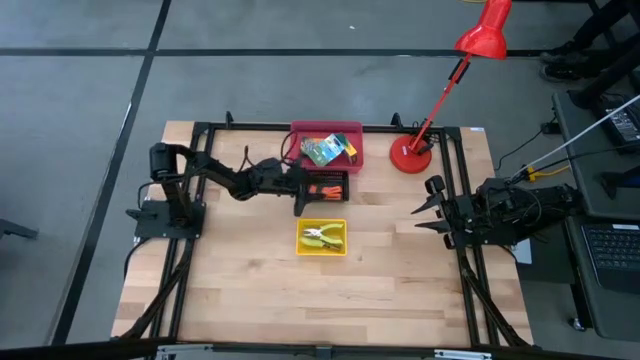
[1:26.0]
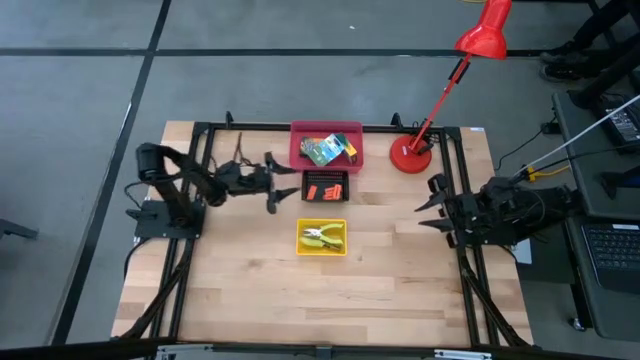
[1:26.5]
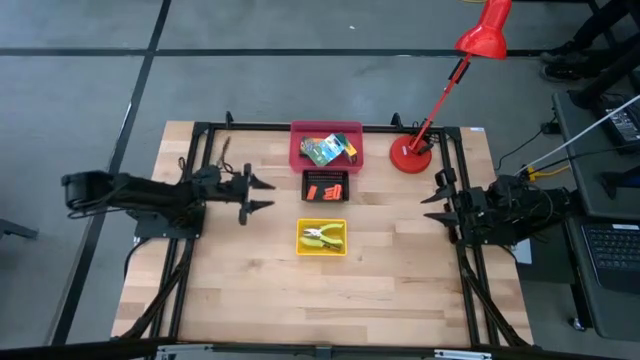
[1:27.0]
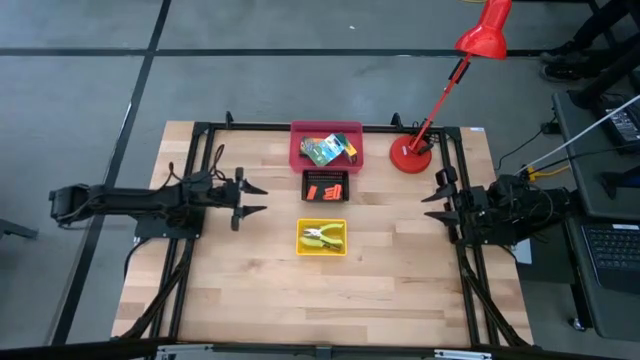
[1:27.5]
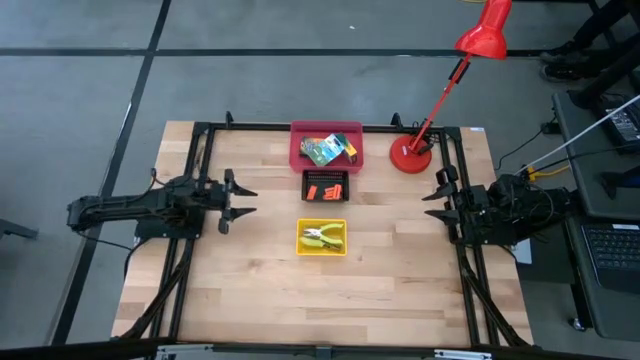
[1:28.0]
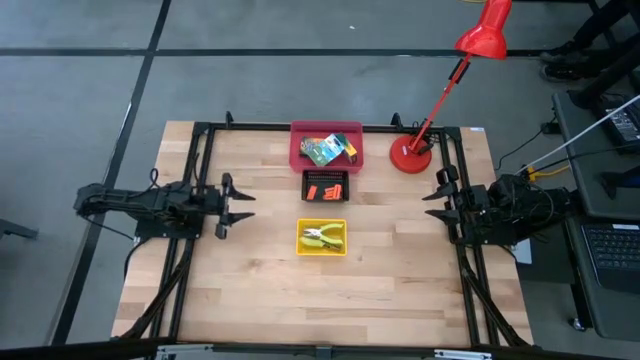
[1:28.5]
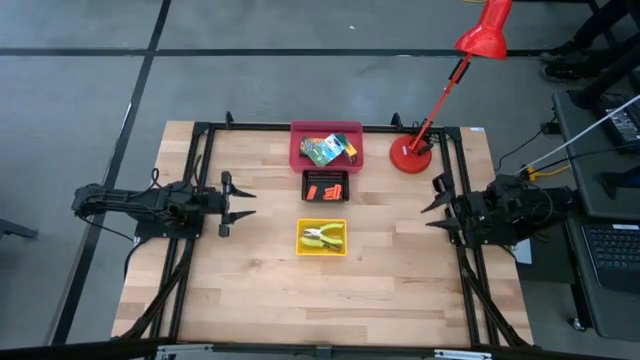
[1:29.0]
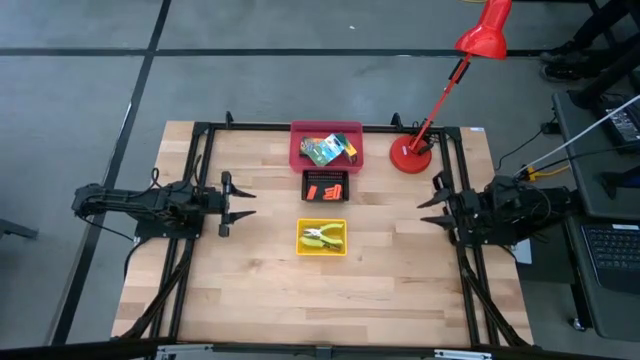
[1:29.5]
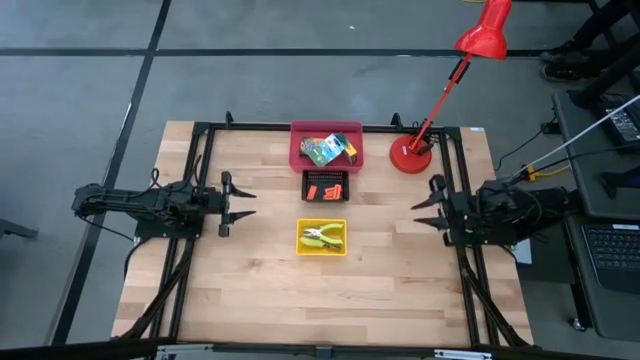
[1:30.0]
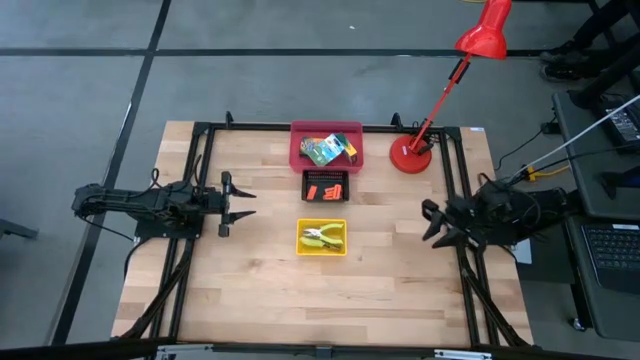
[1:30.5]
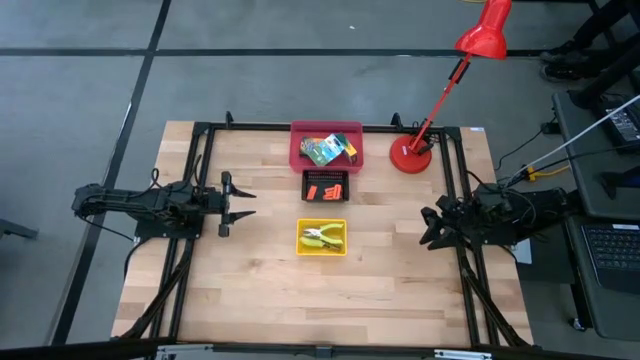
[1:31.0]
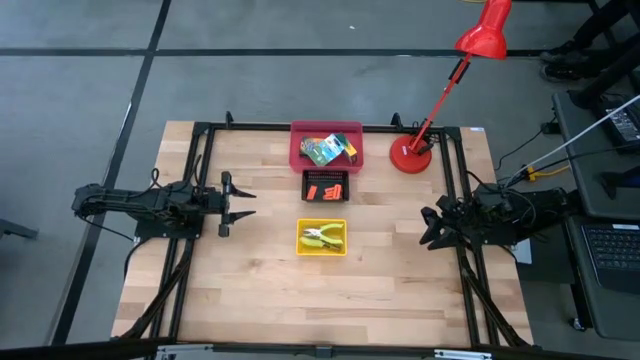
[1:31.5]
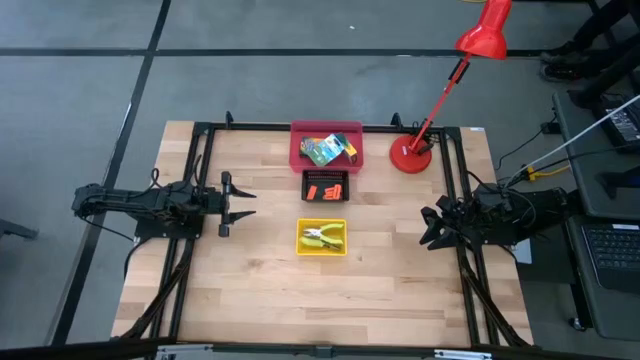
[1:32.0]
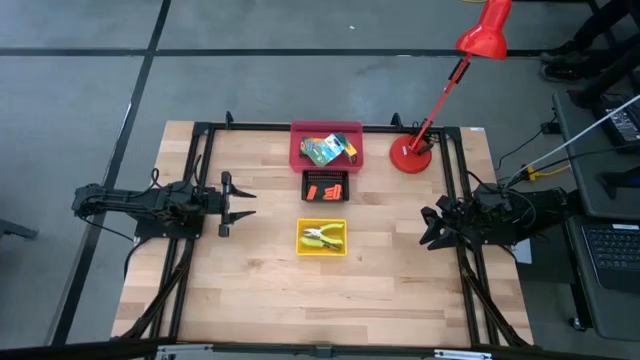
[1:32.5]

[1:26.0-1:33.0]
Task: Pick & Place School Supplies
Return to Home Position

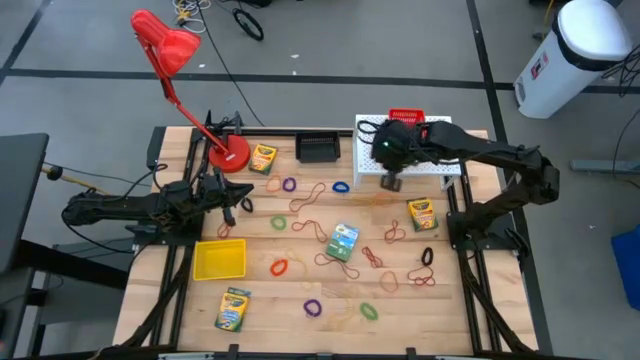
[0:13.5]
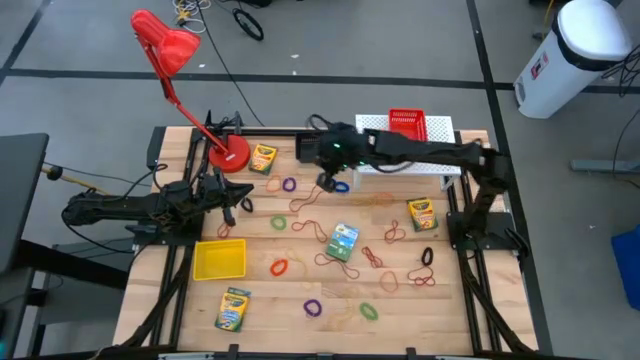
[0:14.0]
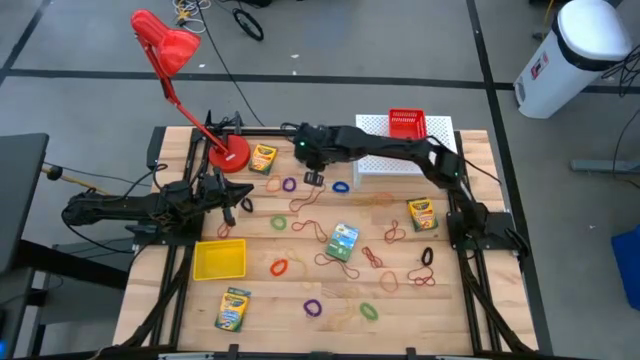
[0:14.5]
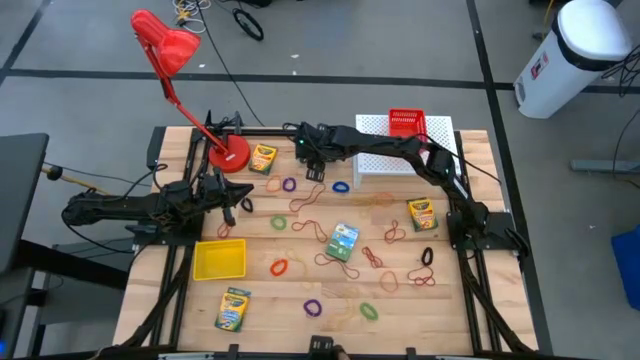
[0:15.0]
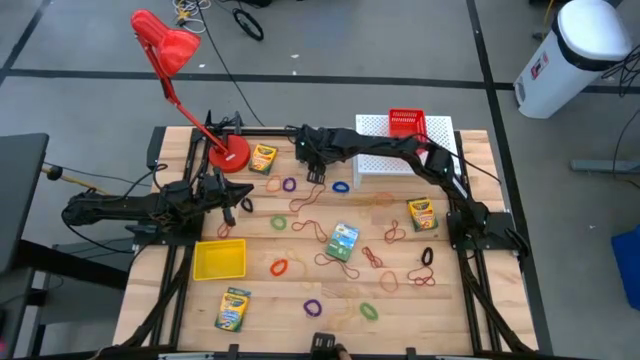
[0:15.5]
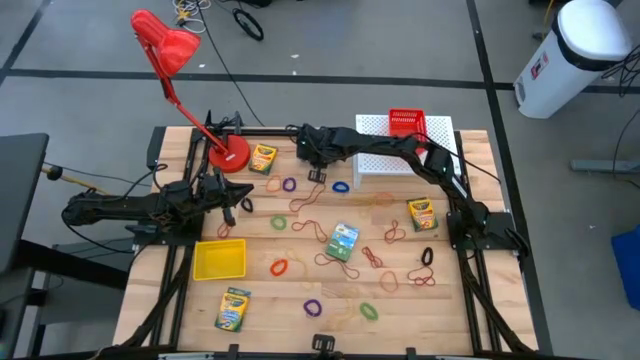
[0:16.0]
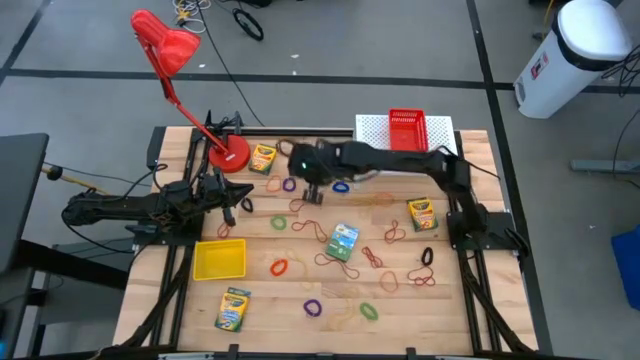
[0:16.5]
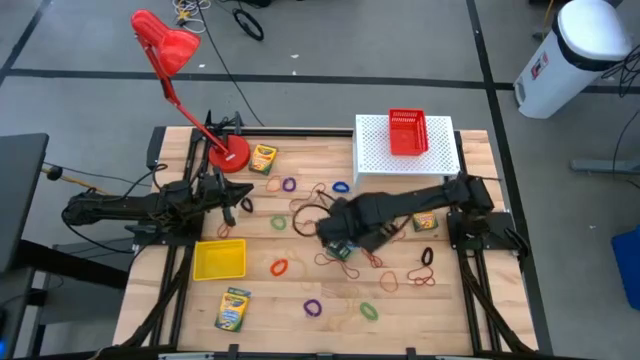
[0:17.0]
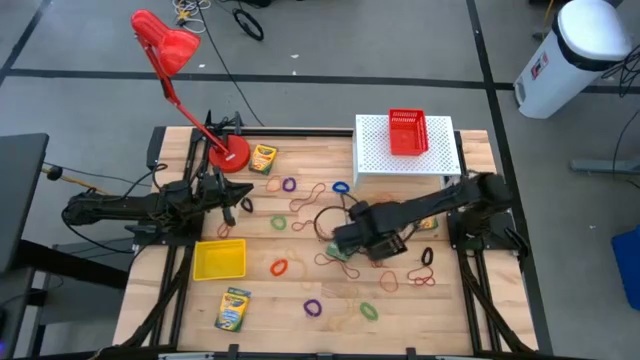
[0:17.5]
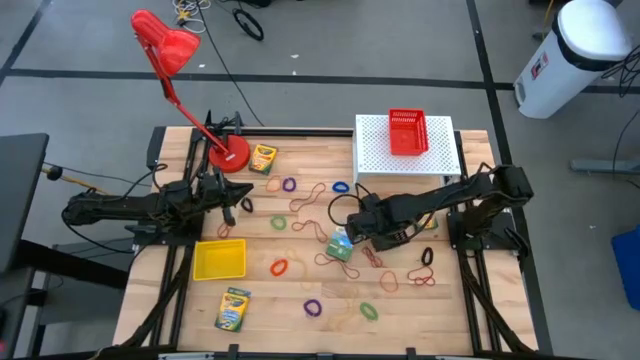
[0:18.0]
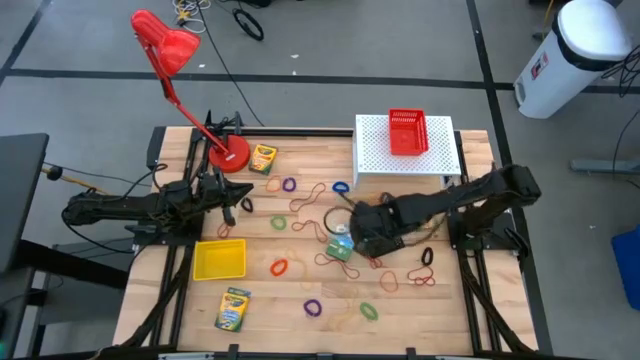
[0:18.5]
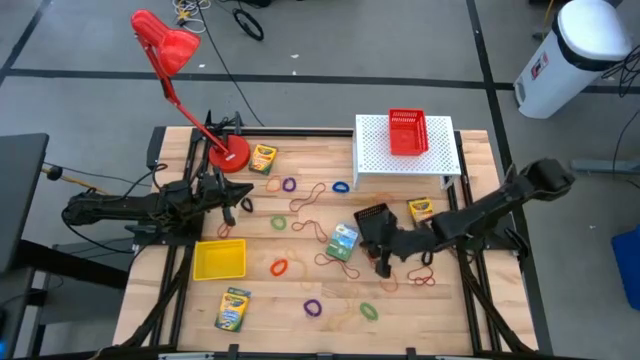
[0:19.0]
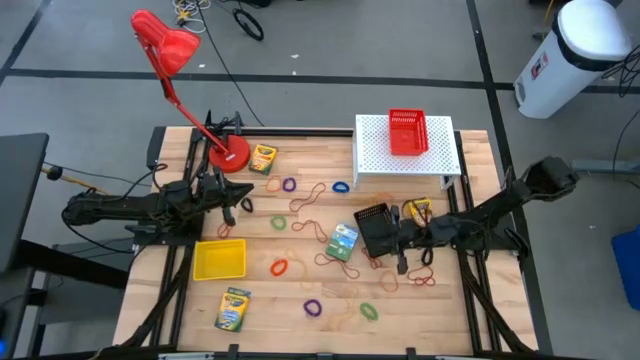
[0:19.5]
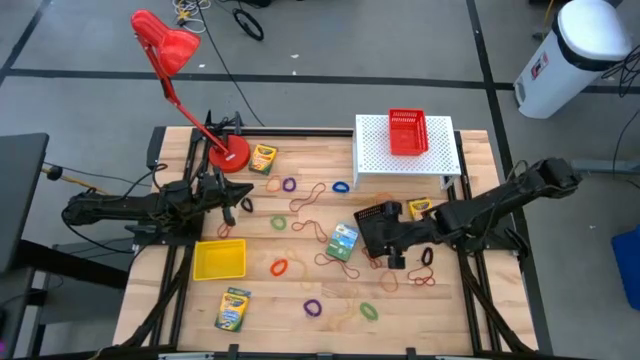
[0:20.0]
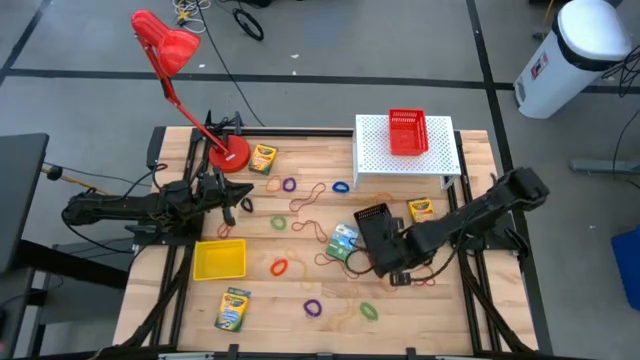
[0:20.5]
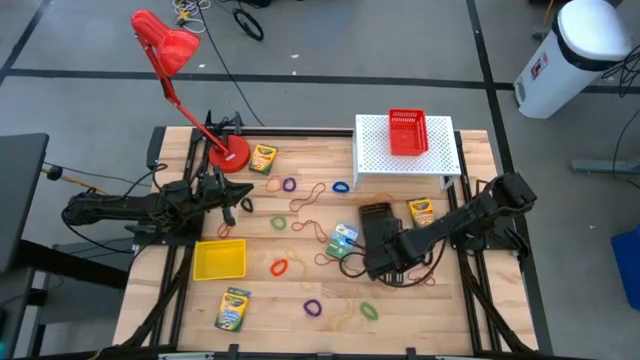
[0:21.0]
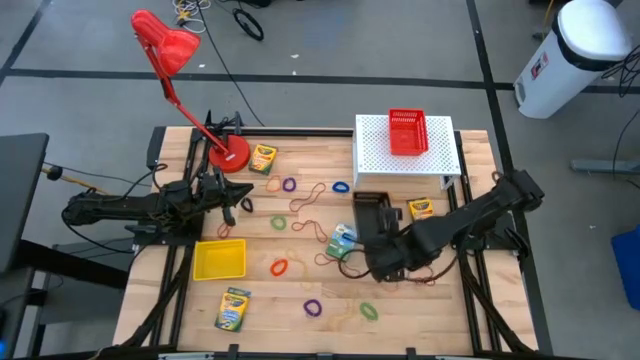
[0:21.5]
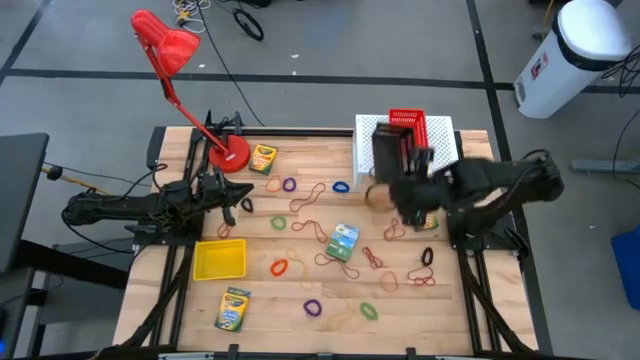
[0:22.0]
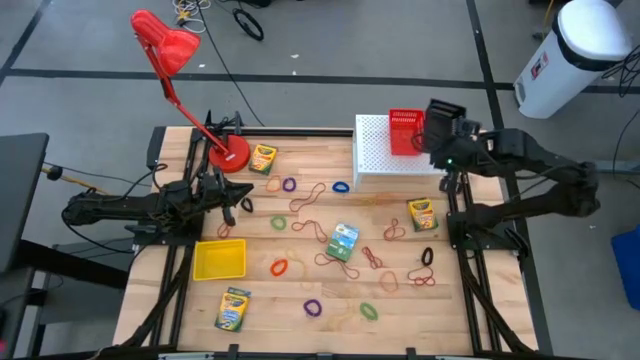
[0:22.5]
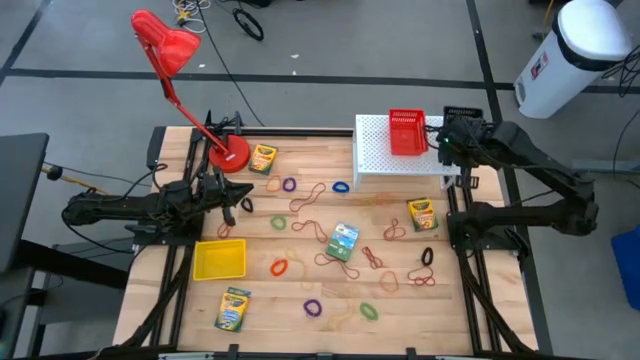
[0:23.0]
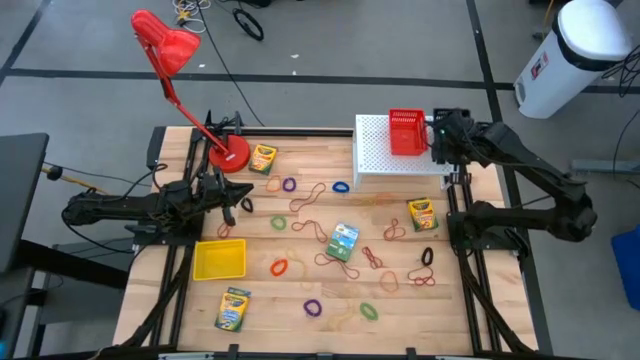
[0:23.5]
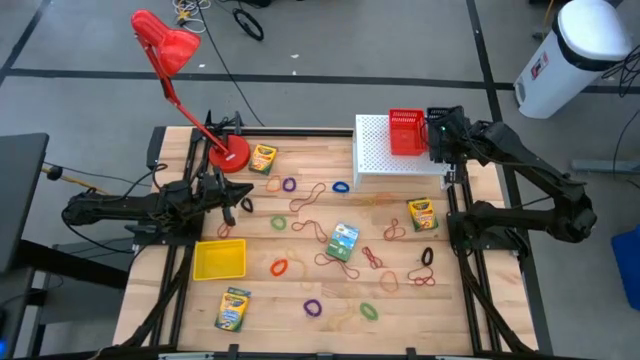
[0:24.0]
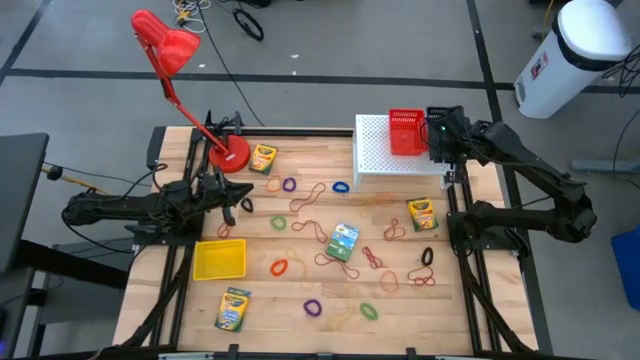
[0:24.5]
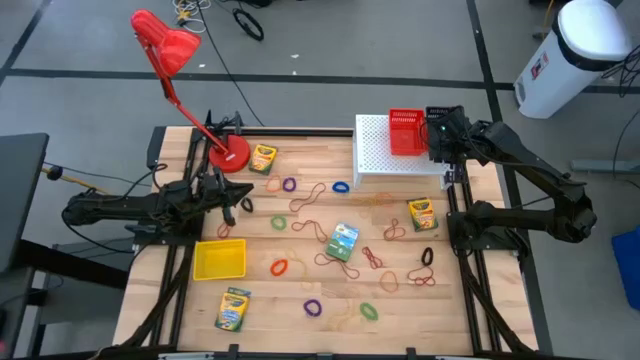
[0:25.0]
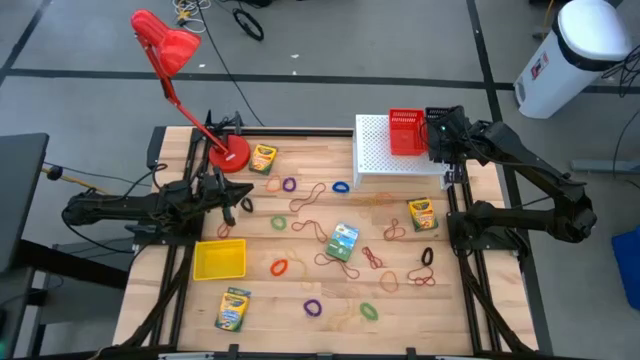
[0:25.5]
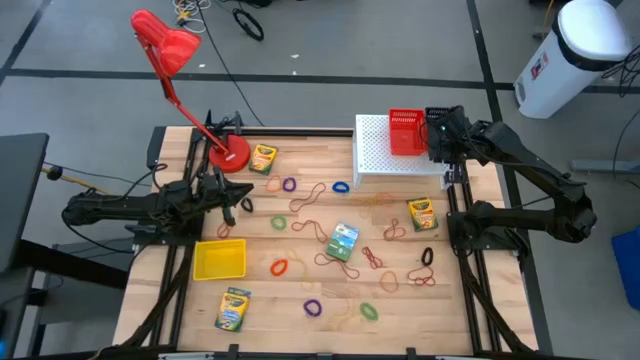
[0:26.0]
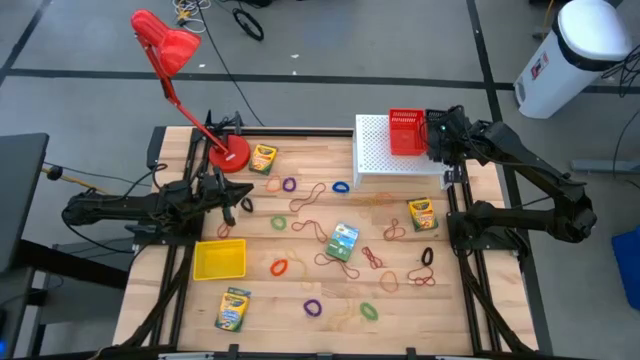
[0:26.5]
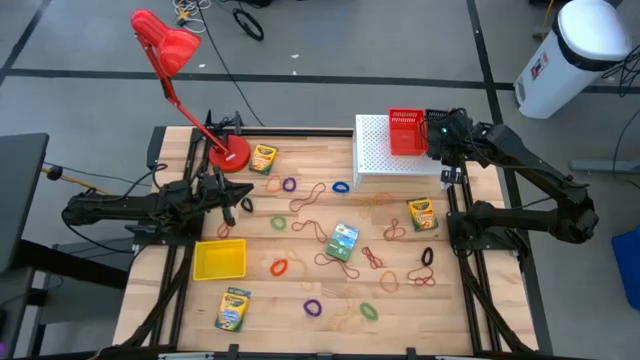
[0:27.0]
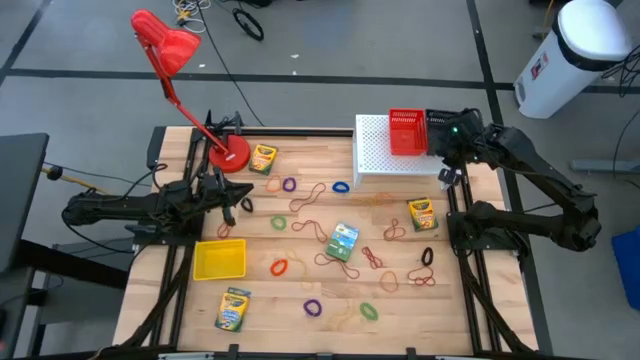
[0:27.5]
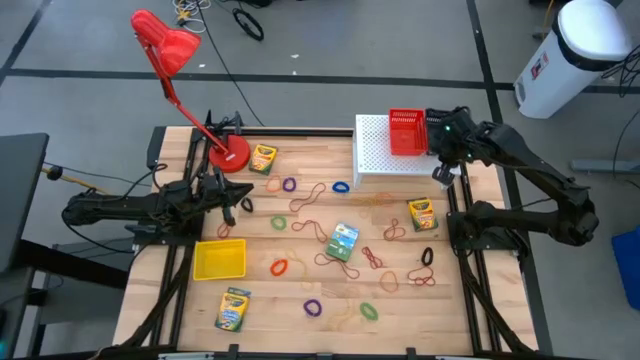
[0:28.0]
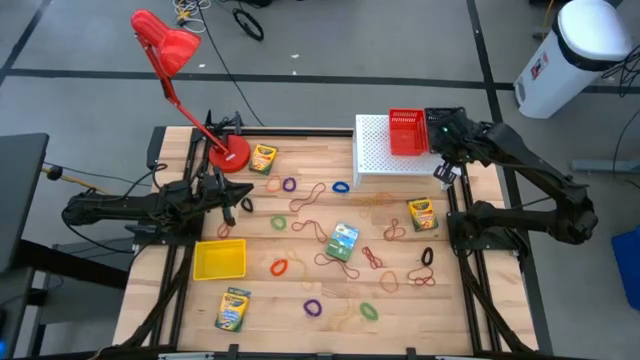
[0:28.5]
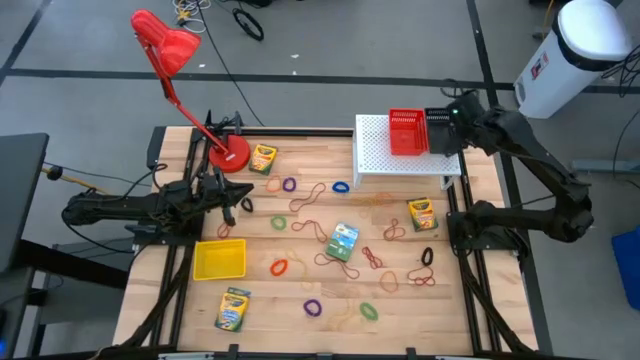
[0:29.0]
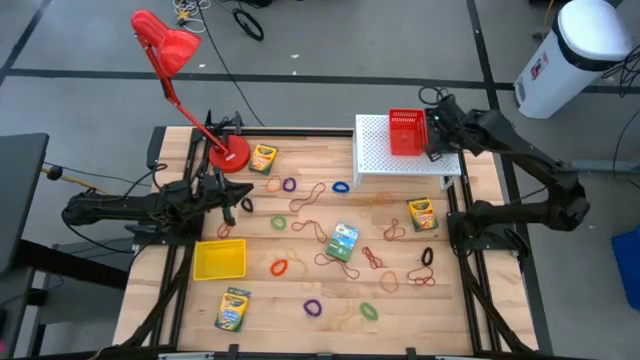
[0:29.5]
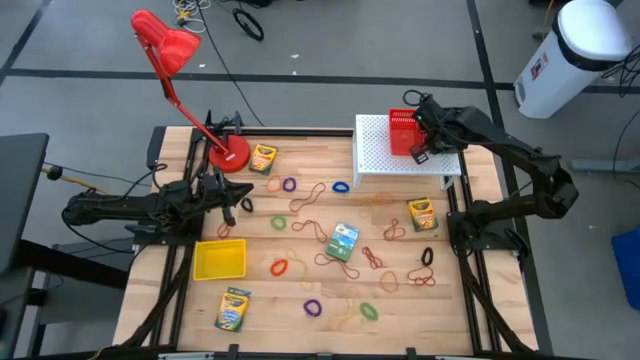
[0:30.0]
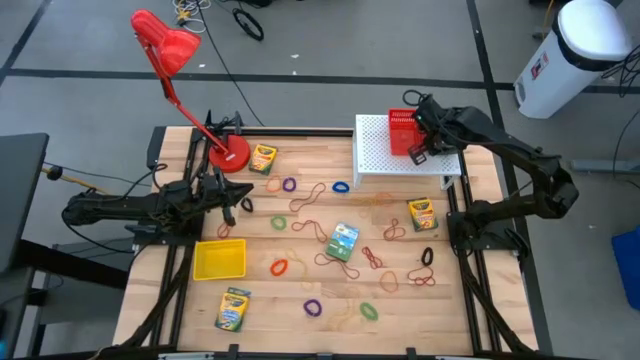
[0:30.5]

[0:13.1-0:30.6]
Task: Pick & Place Office Desk Supplies
Put the black basket on the shelf
